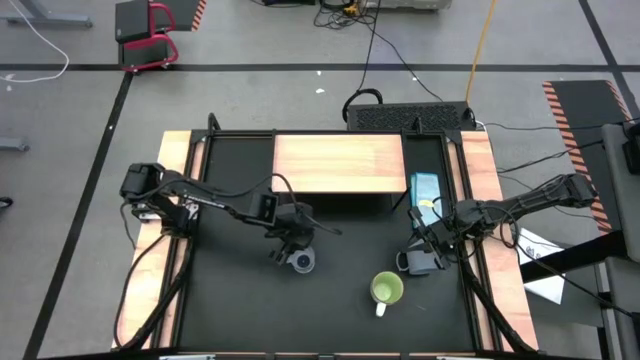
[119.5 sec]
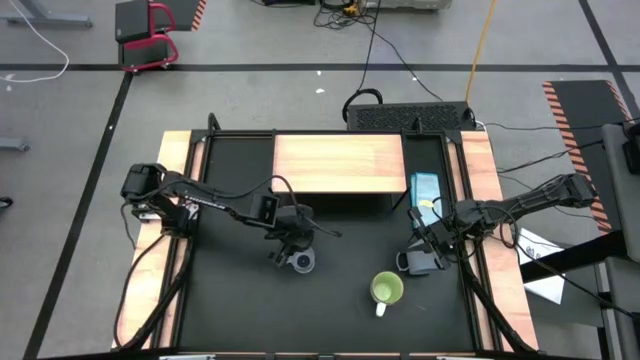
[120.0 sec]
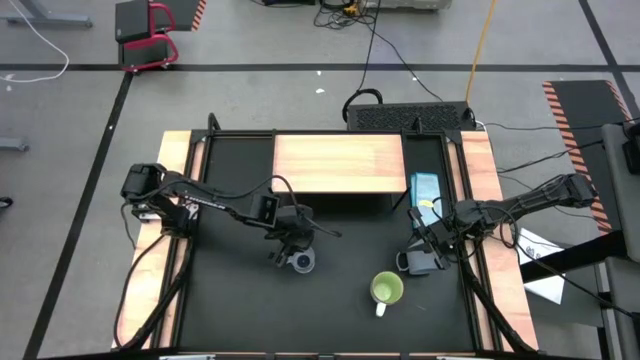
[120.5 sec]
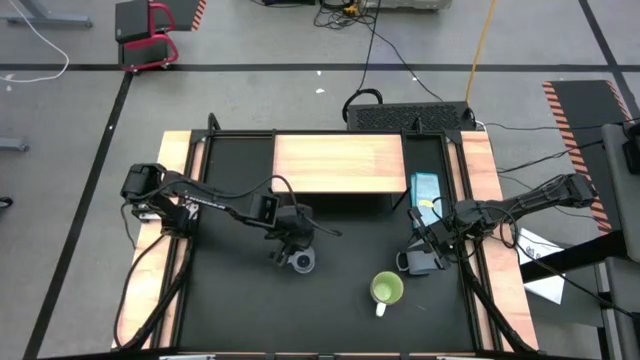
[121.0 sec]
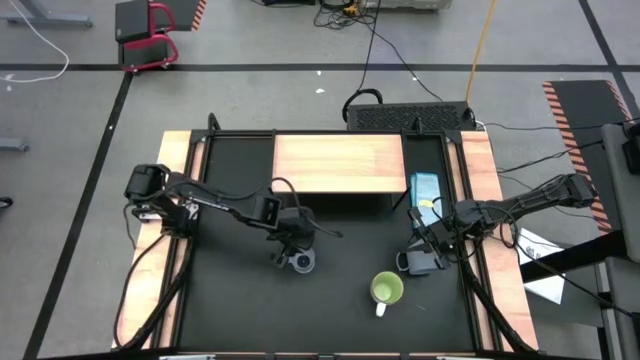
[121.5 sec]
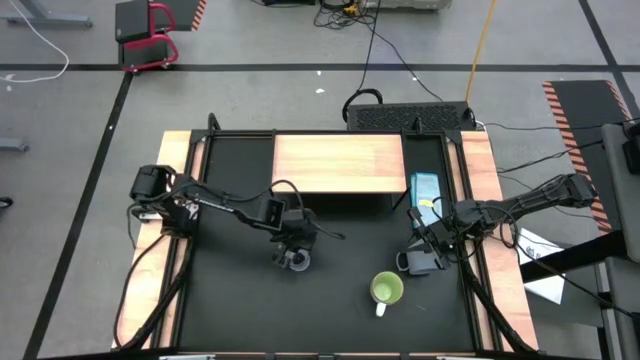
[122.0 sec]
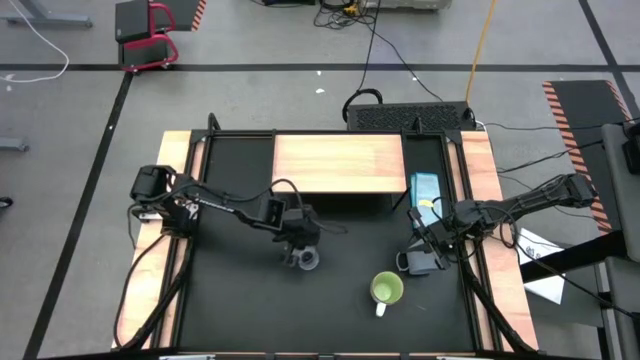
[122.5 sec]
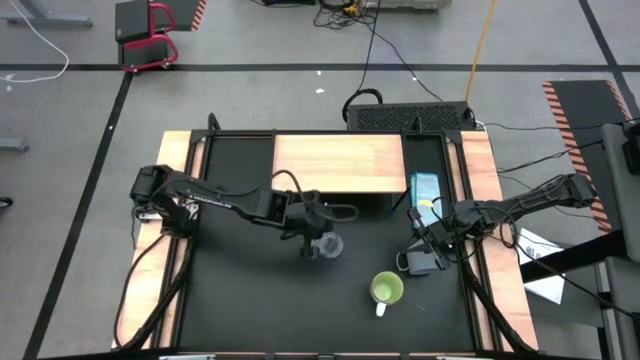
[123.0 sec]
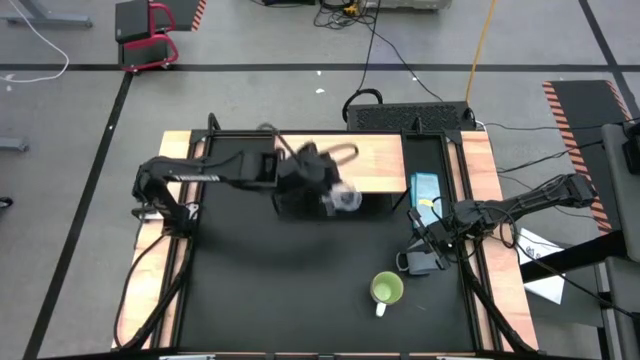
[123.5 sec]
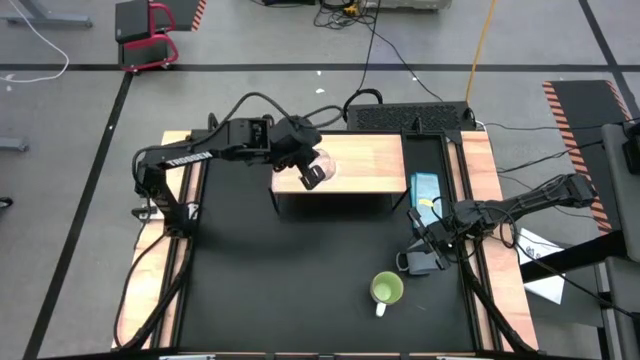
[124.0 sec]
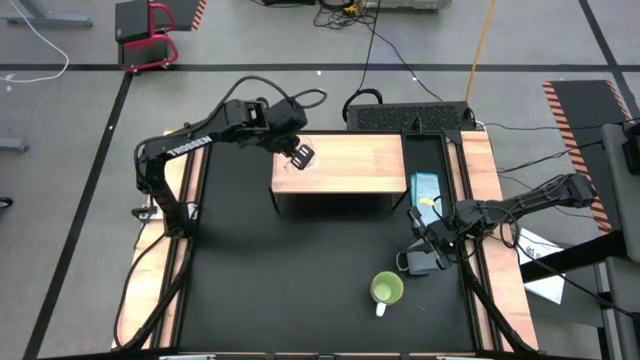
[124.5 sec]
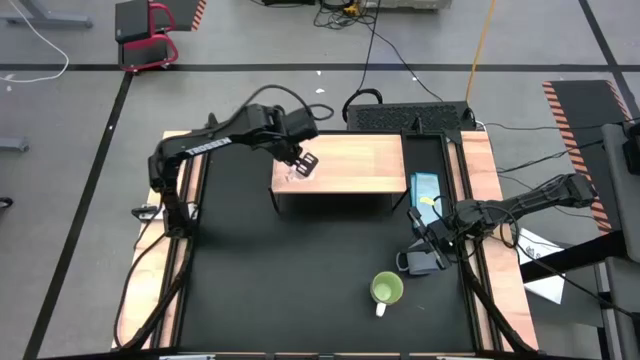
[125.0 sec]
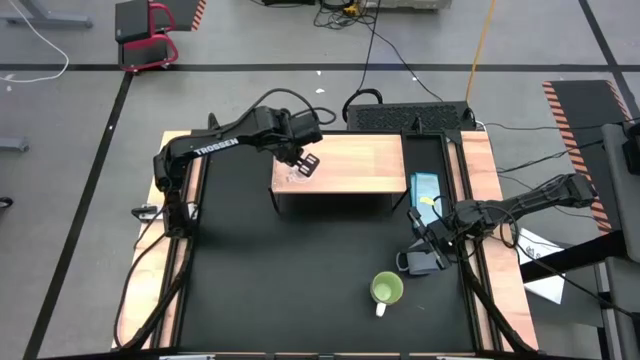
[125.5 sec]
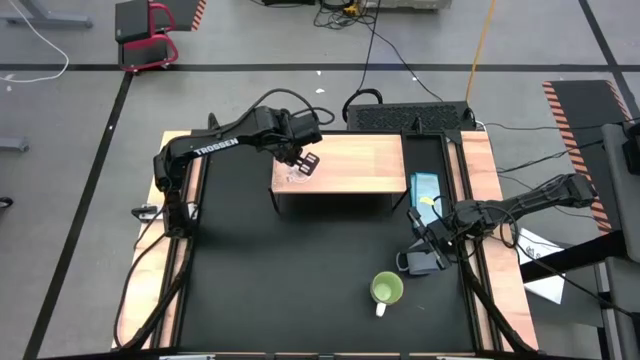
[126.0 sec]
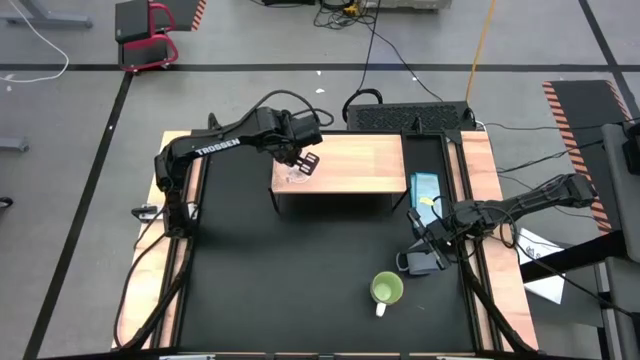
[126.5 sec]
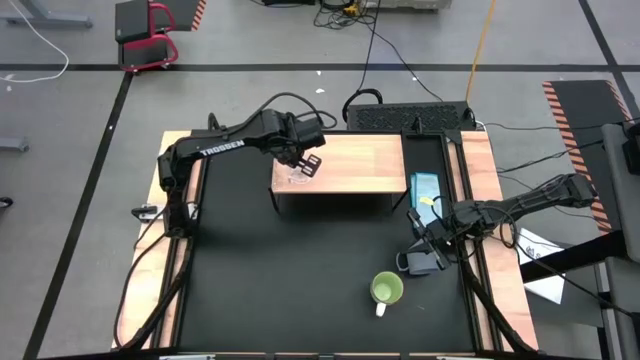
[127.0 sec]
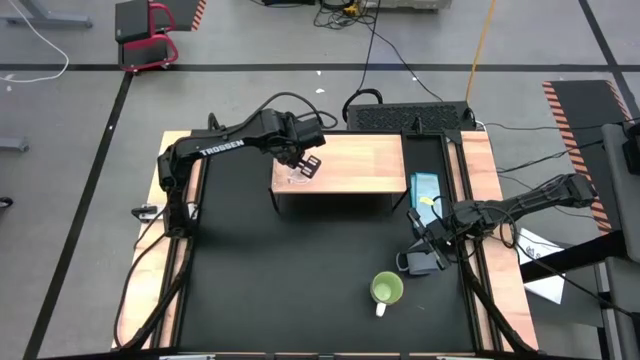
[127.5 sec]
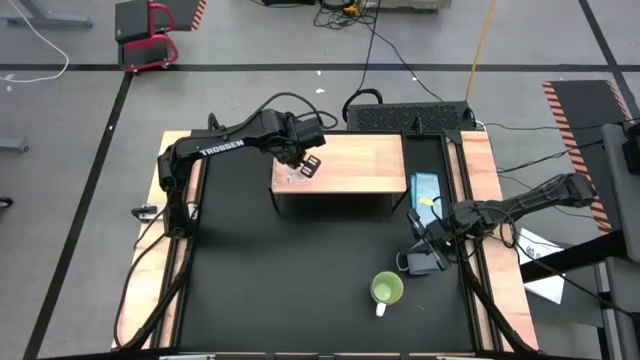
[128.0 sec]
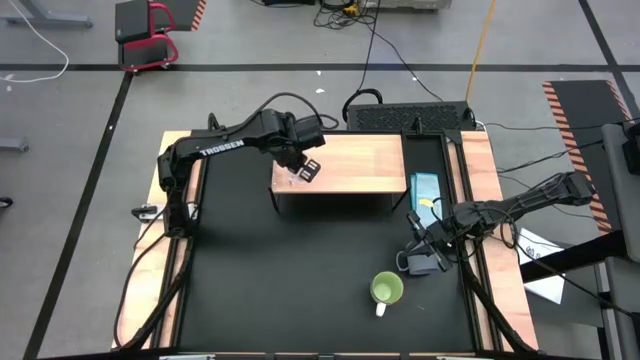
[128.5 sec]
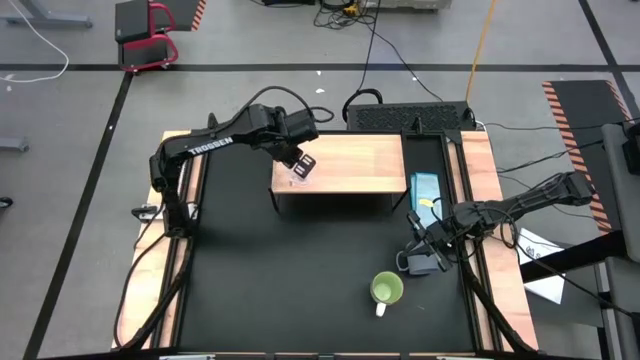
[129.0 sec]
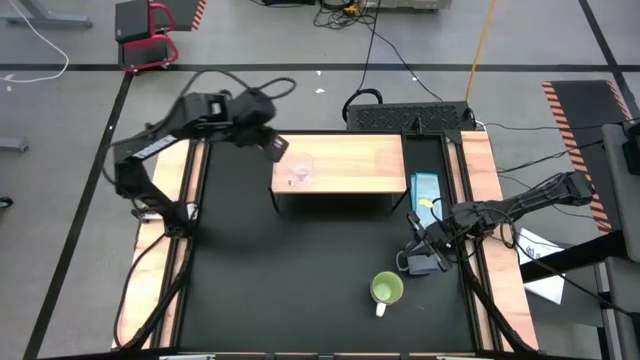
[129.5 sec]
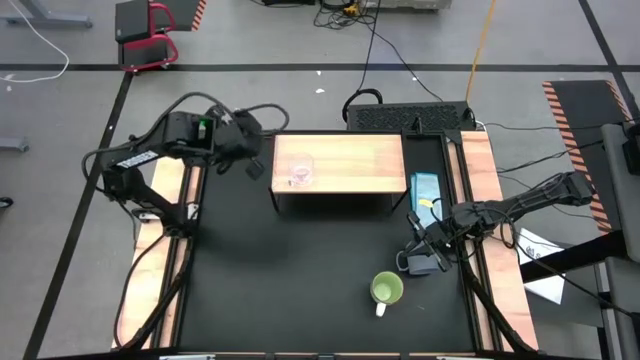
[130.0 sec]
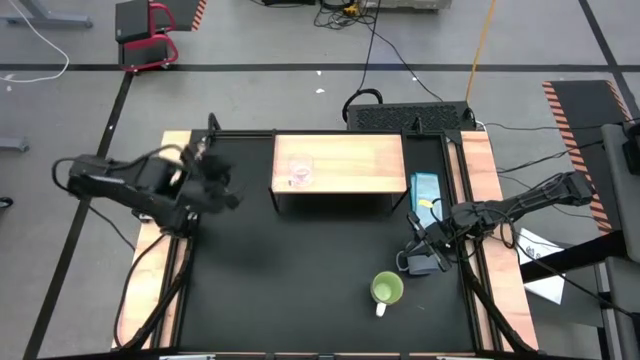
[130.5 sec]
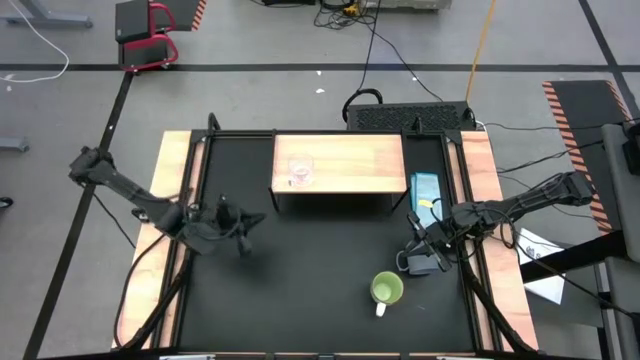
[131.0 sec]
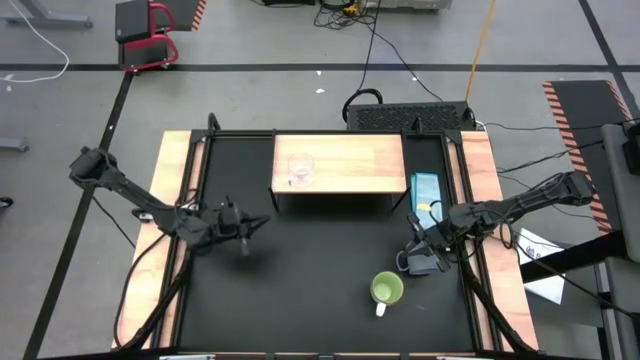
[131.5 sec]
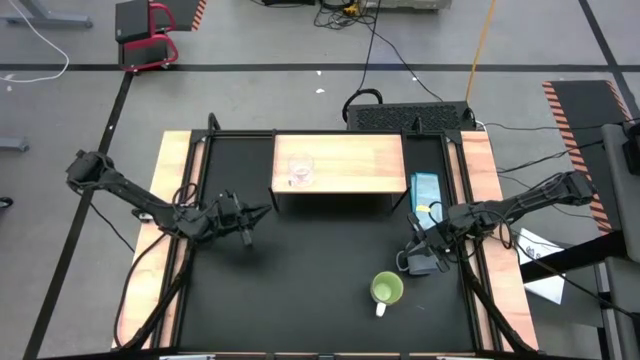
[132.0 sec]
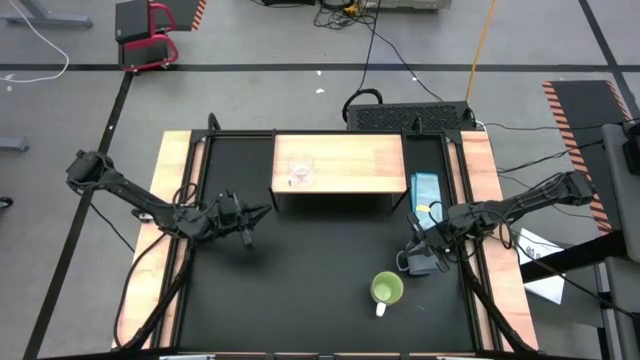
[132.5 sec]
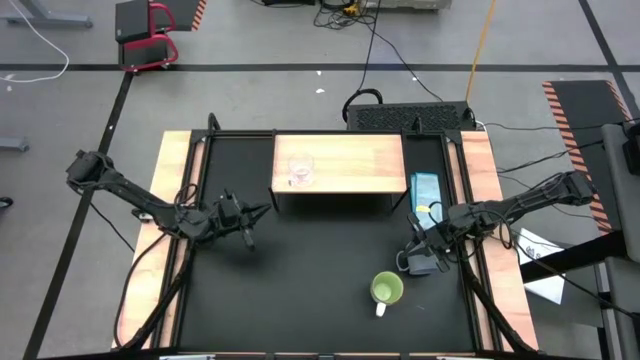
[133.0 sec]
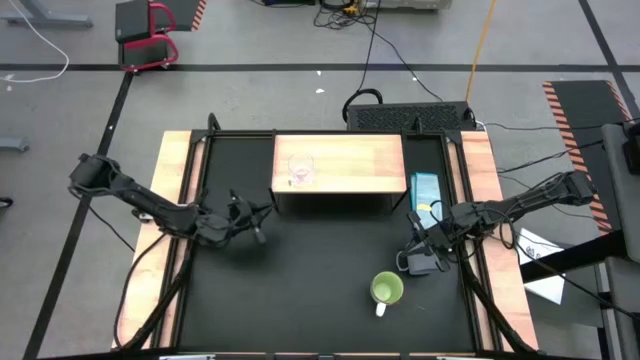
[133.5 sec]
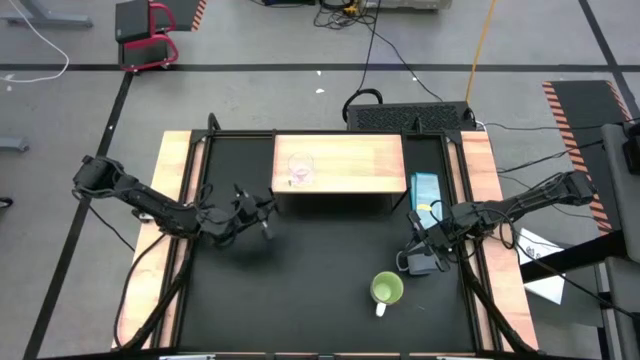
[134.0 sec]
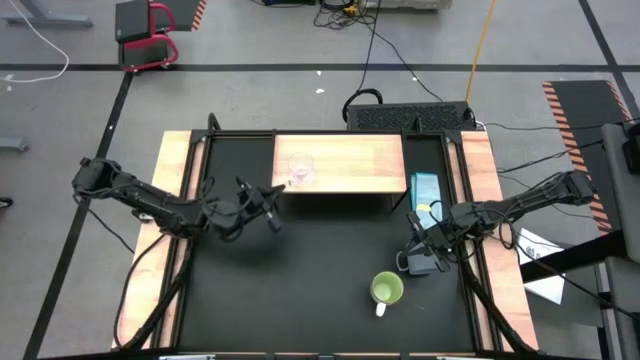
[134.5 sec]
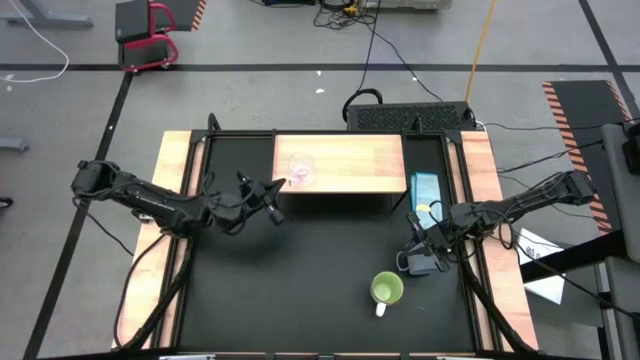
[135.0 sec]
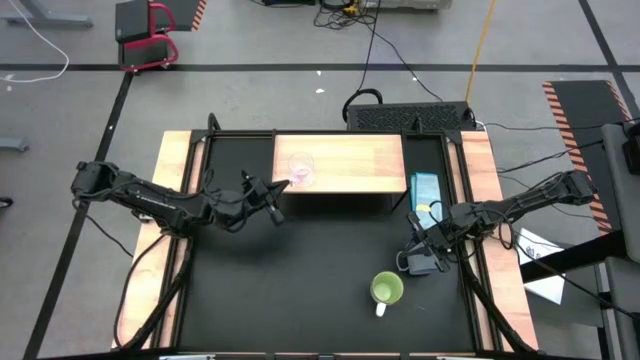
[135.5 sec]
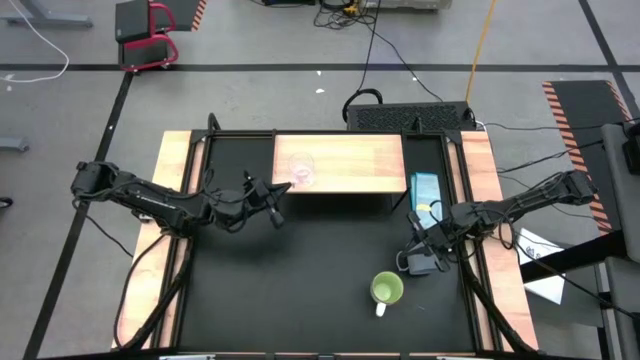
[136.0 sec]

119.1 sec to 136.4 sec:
Task: Stack small to large cups/mugs on shelf
Put the transparent mug on the shelf

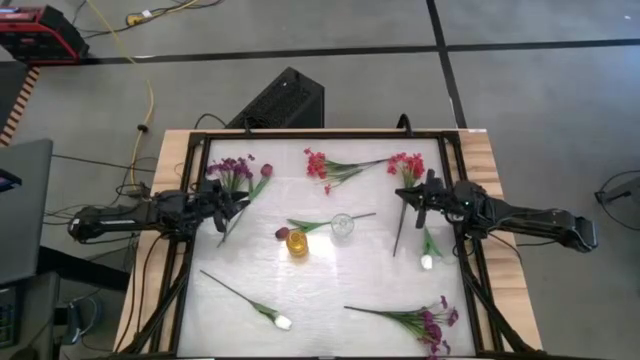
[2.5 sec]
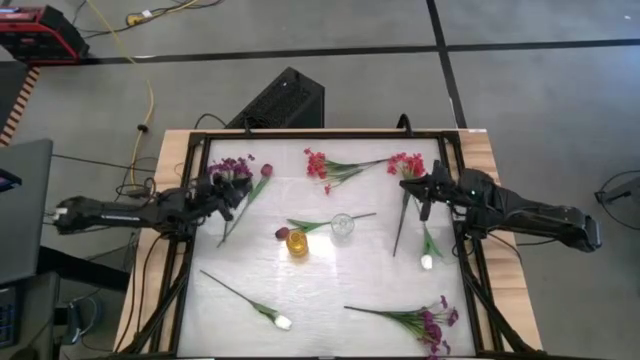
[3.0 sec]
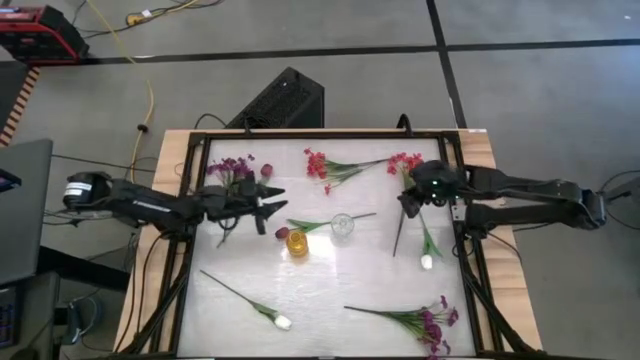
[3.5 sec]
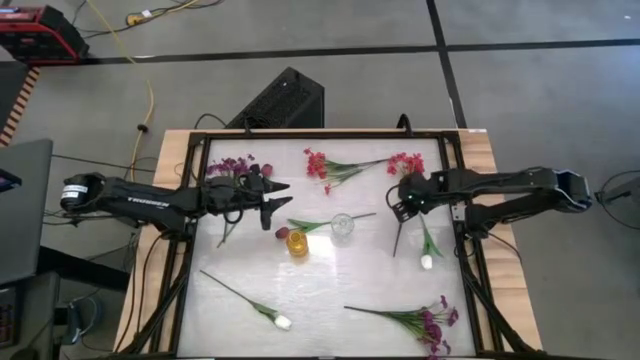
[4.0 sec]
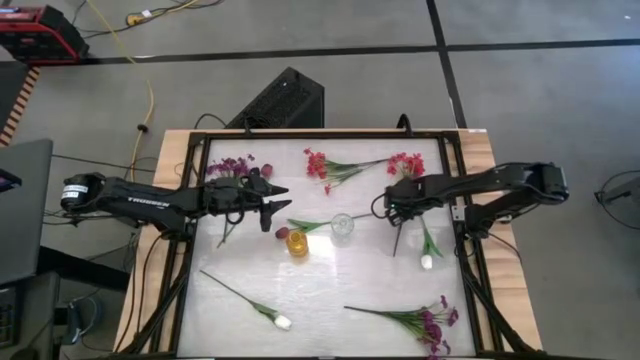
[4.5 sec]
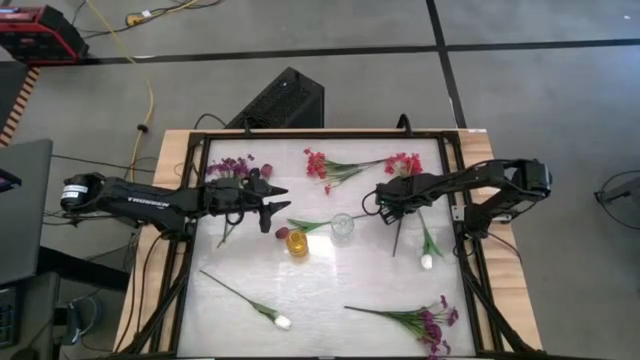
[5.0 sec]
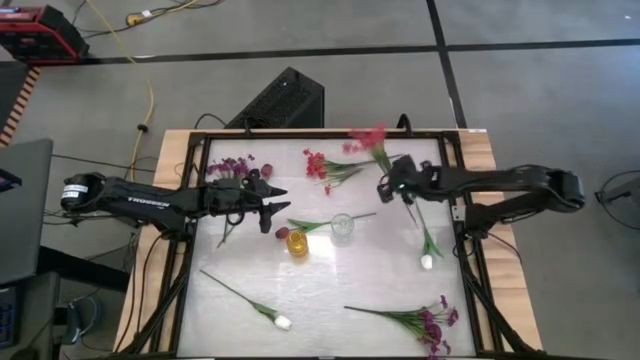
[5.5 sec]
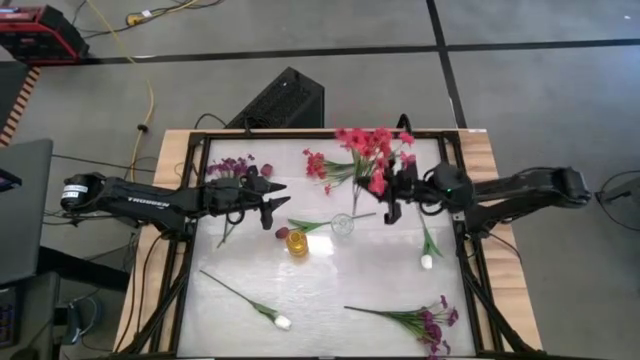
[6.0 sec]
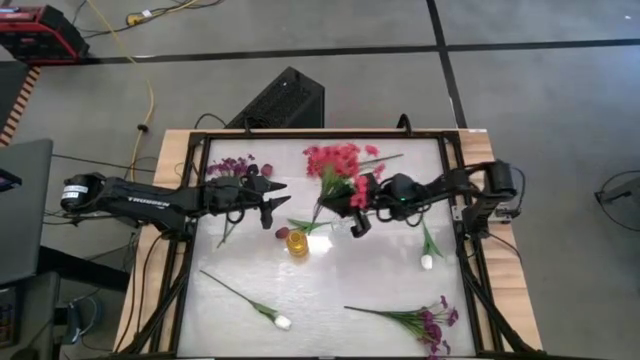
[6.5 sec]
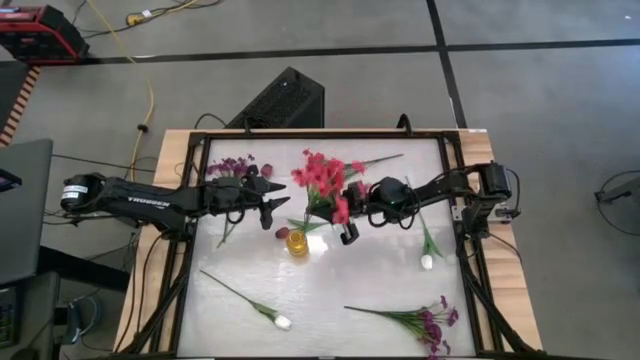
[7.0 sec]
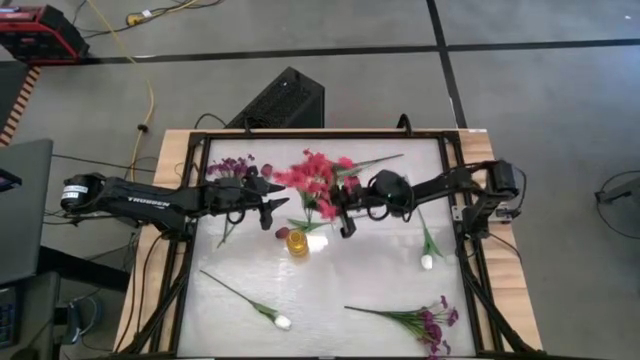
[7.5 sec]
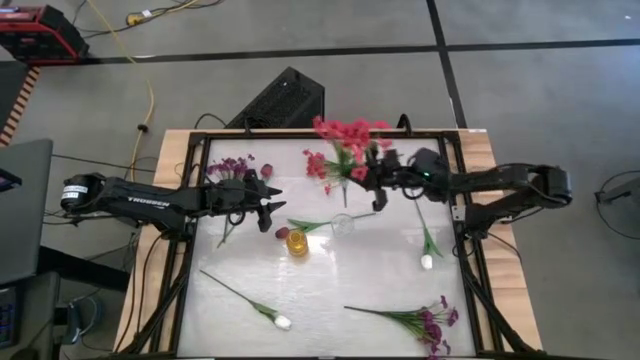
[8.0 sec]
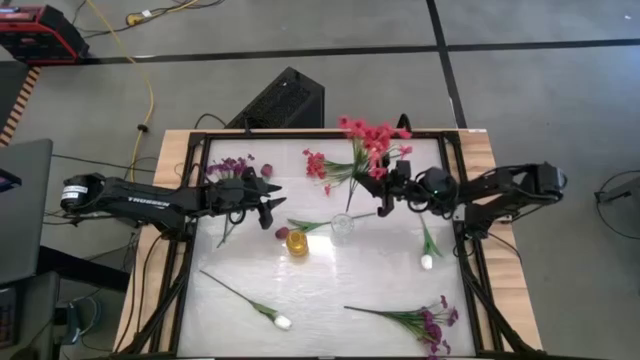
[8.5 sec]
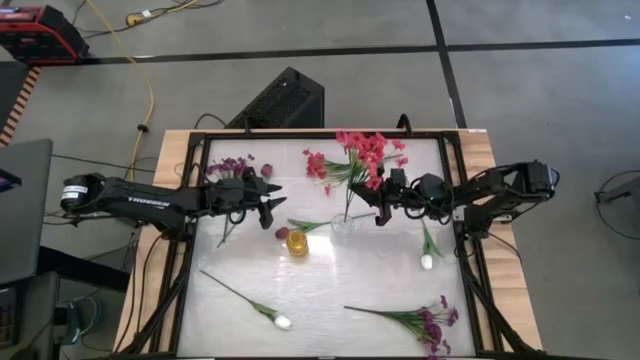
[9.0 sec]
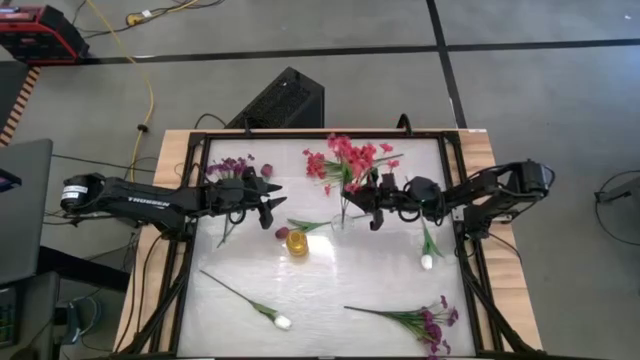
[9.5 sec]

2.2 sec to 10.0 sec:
Task: Sort flowers into vase by color
Put the bottom red flowers into the transparent vase
